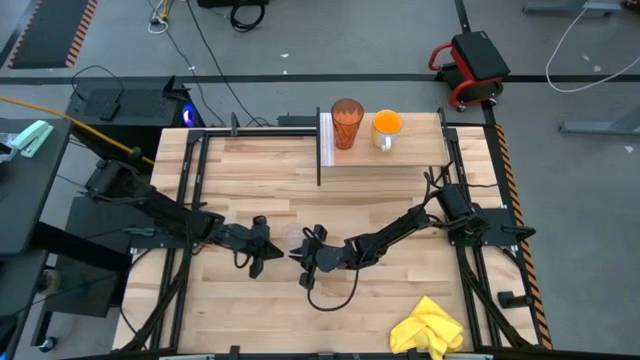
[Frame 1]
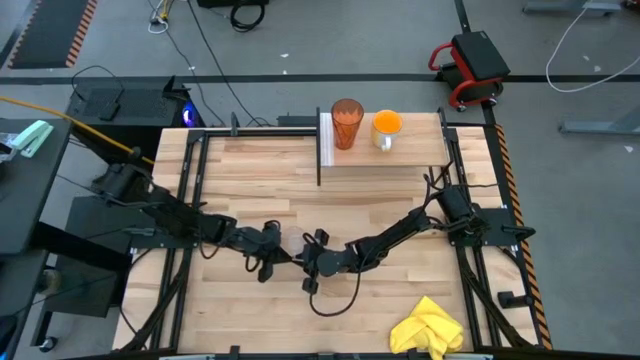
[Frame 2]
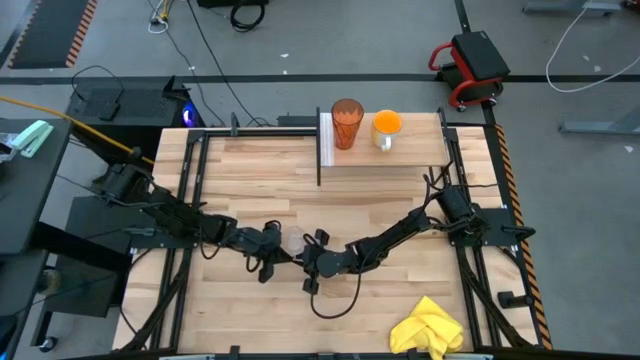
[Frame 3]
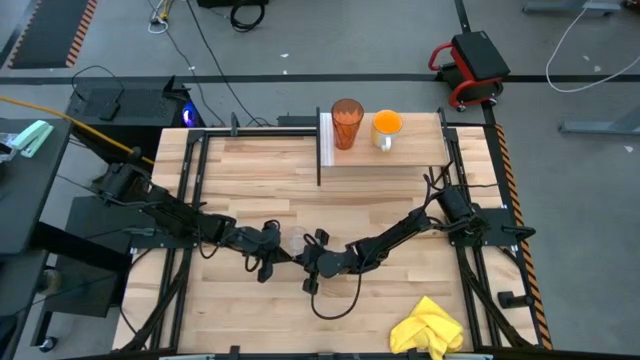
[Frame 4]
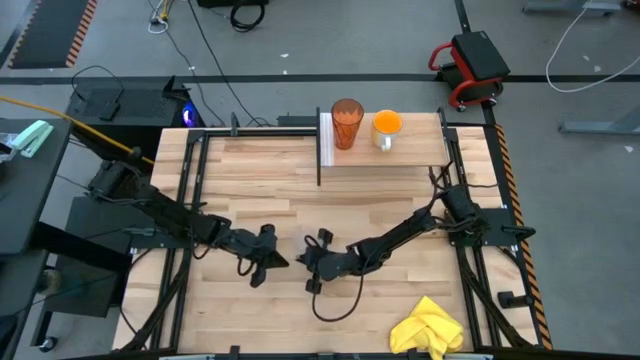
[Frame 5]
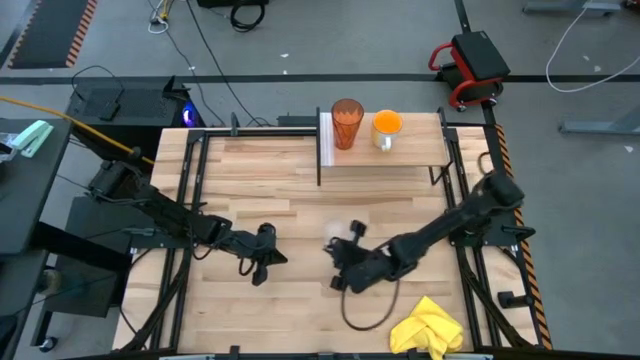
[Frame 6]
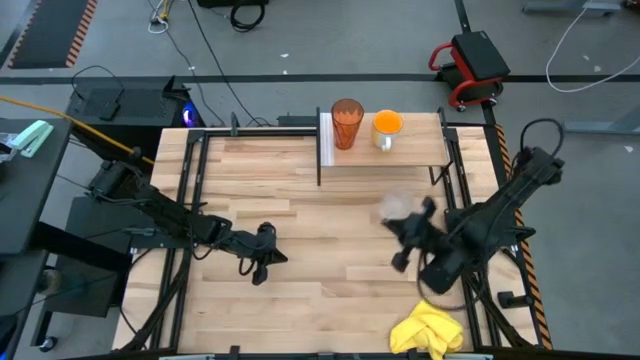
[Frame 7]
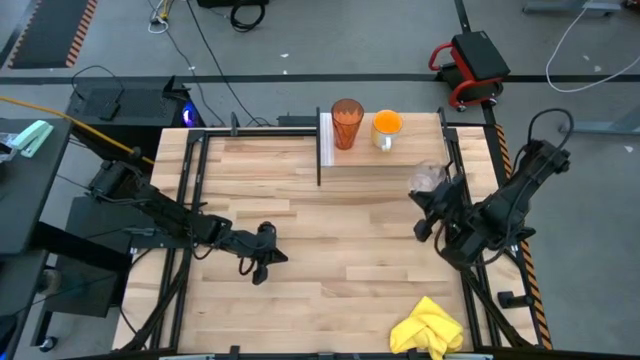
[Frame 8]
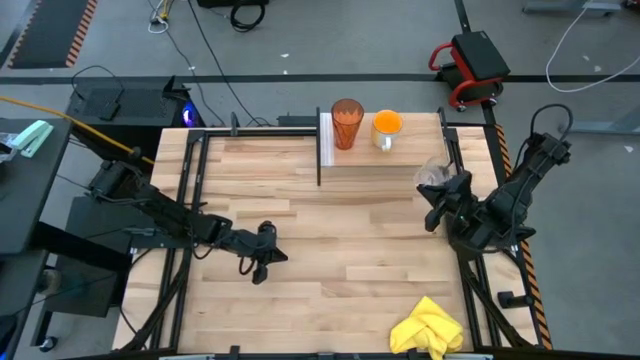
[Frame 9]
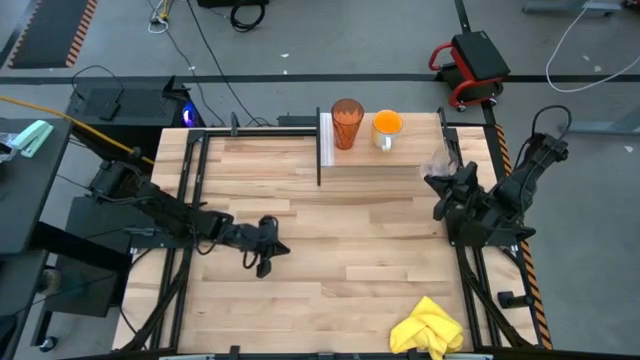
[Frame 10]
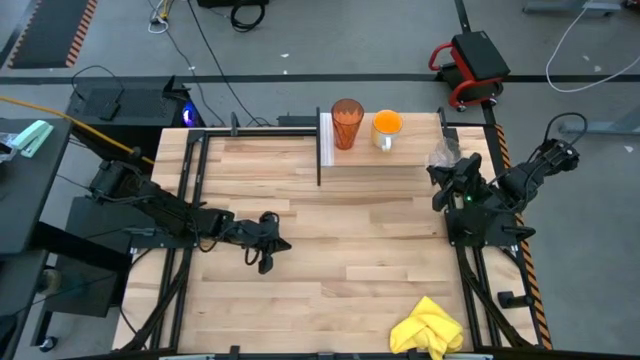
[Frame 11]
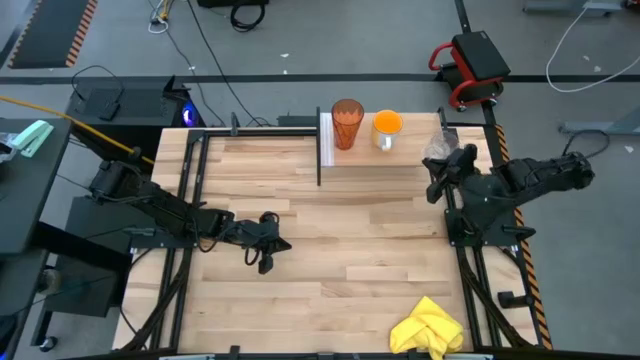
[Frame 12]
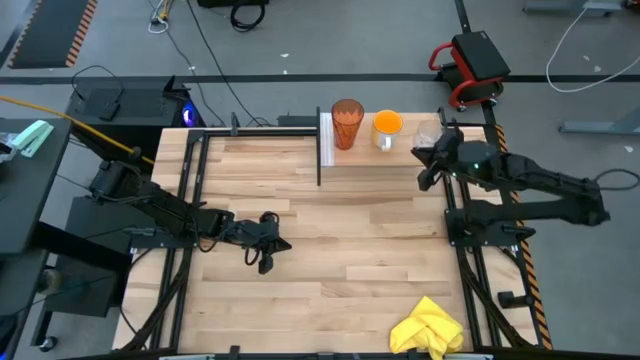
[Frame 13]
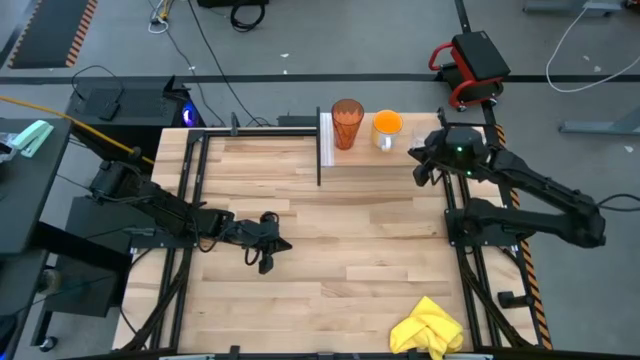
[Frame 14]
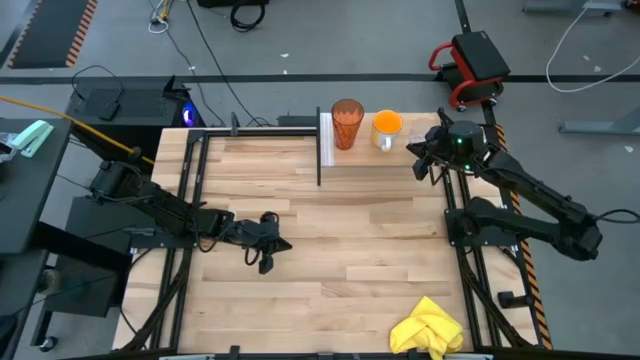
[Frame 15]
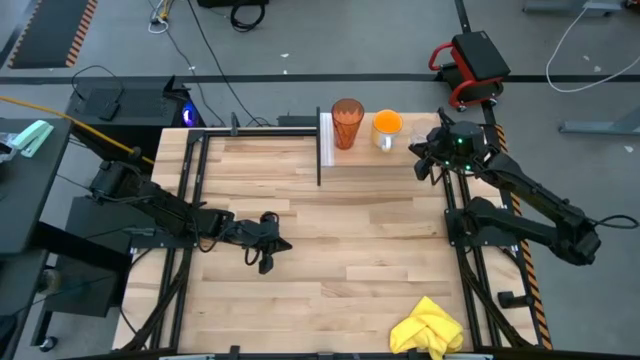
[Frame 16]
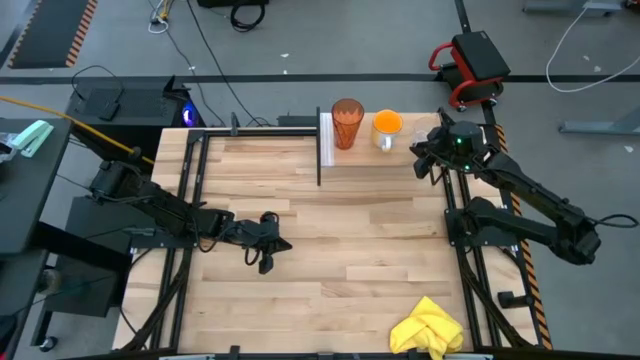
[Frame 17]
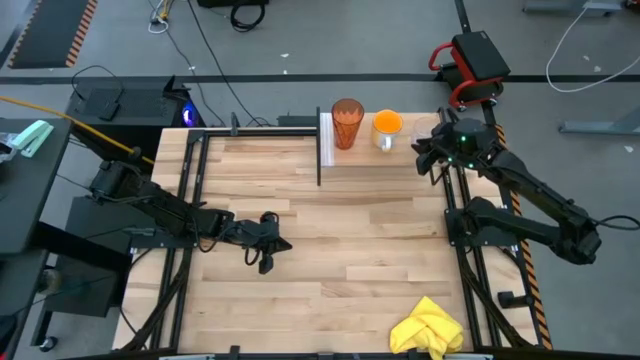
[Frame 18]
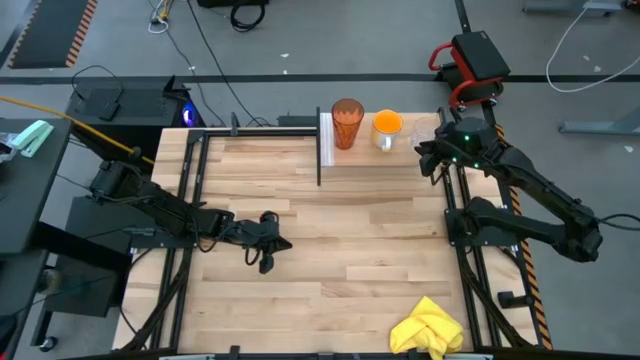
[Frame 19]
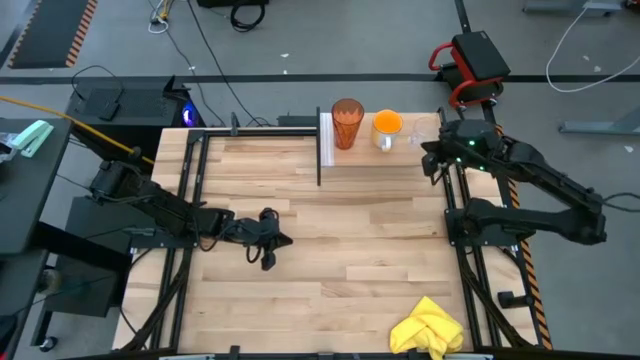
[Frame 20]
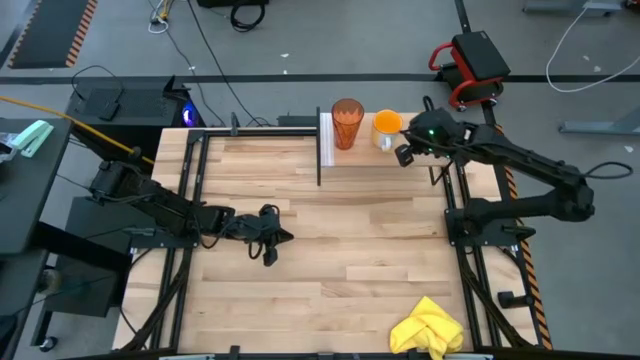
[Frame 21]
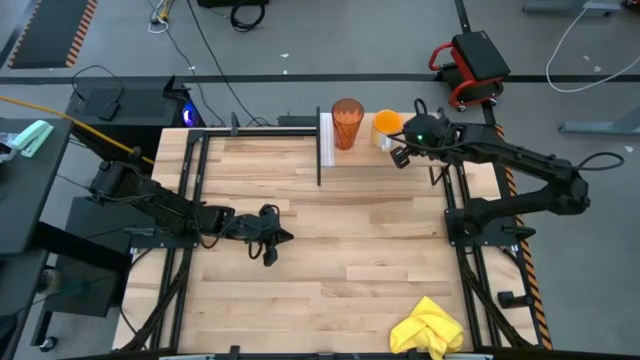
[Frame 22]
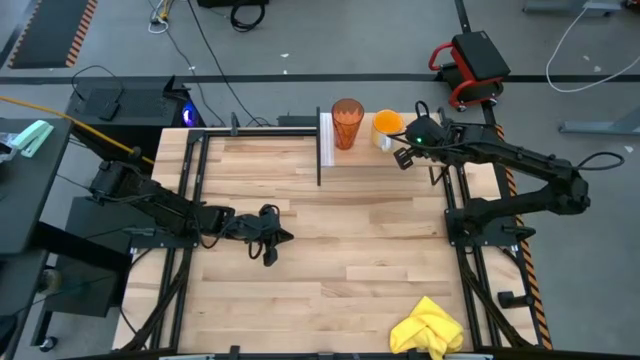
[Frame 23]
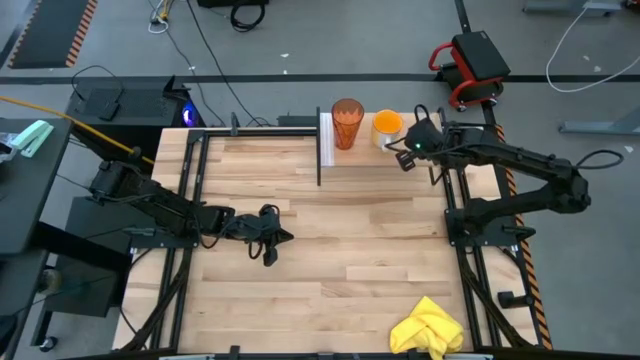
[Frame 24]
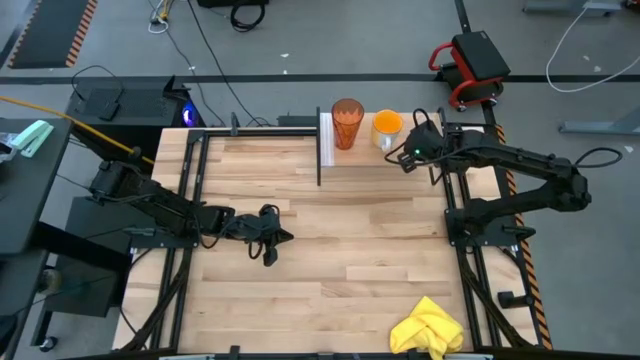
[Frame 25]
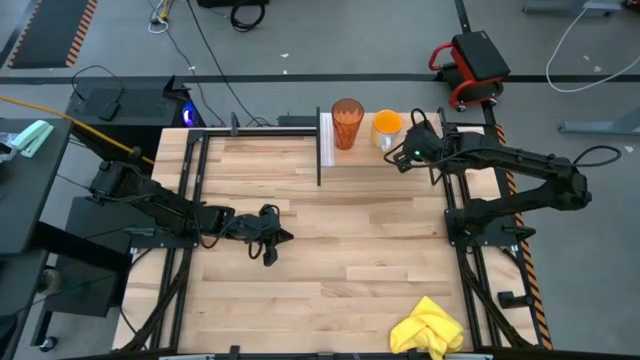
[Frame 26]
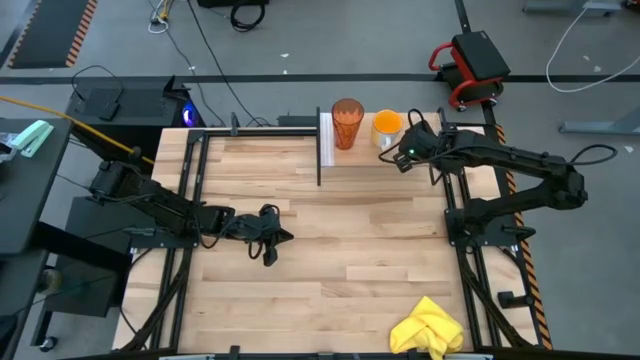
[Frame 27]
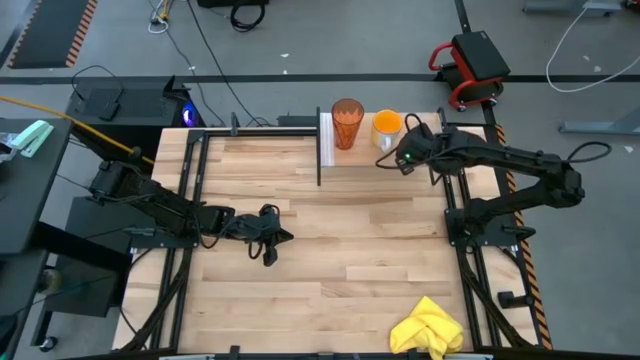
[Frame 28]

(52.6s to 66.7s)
Task: Stack small to large cups/mugs on shelf
Put the transparent mug on the shelf

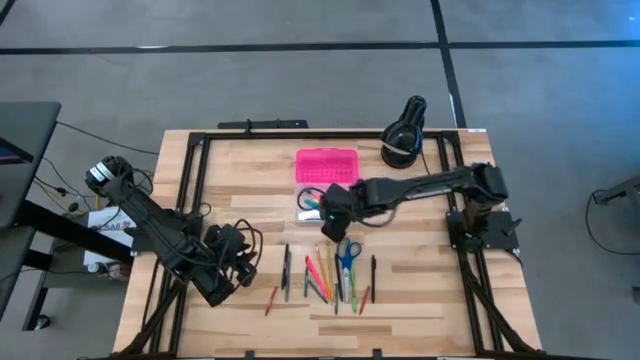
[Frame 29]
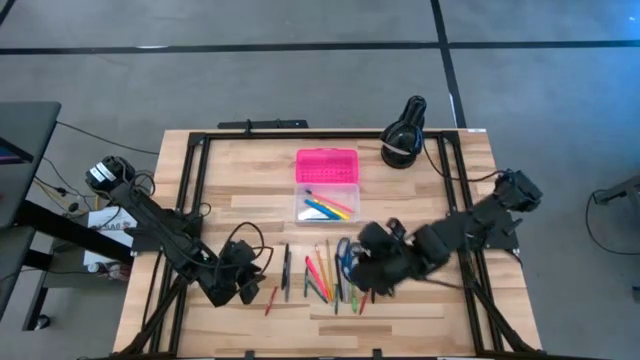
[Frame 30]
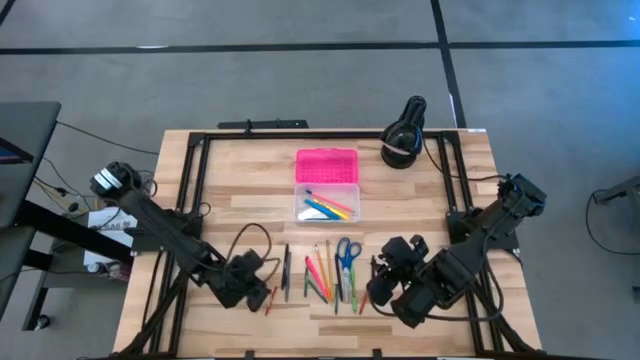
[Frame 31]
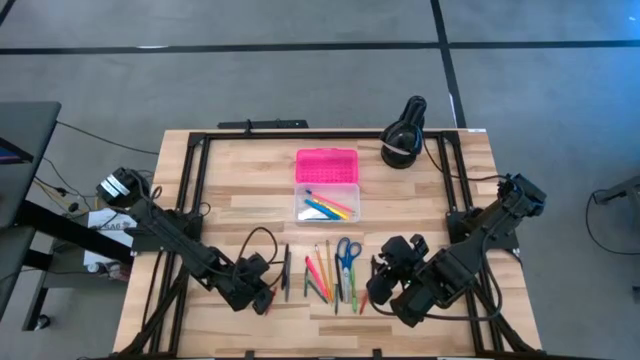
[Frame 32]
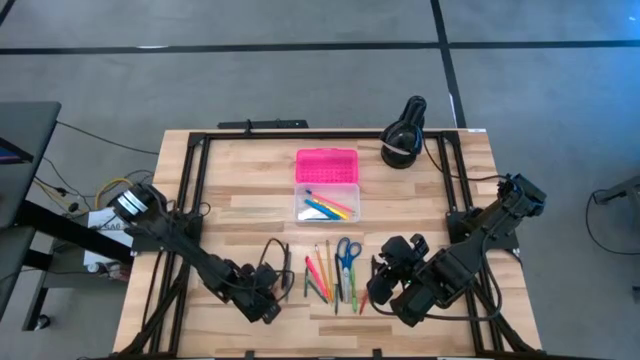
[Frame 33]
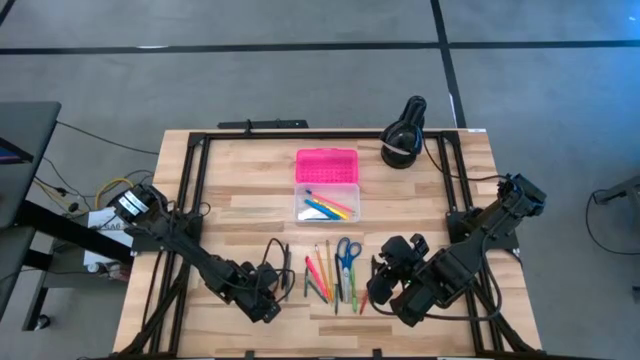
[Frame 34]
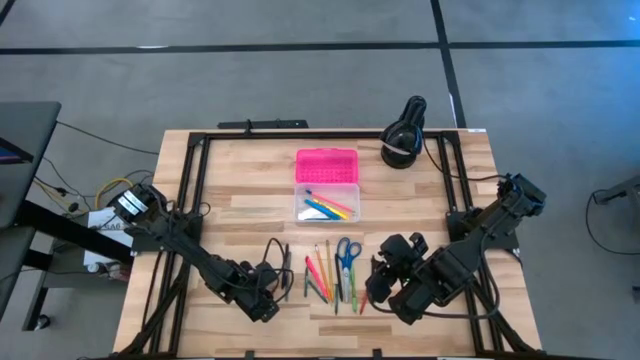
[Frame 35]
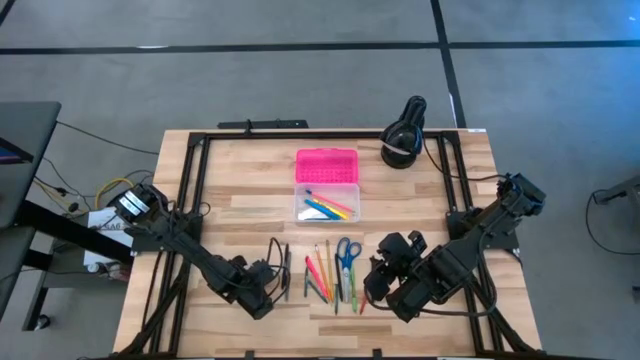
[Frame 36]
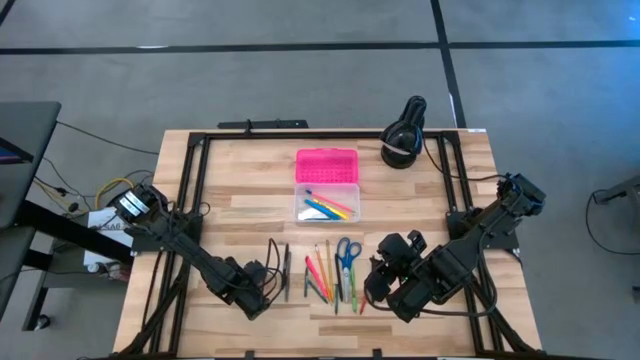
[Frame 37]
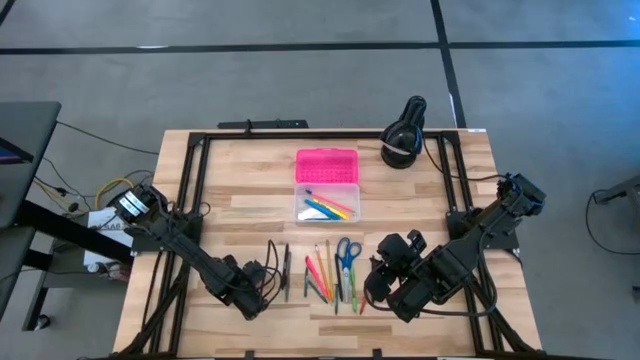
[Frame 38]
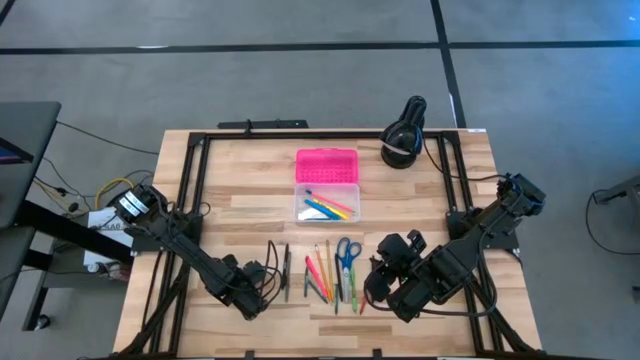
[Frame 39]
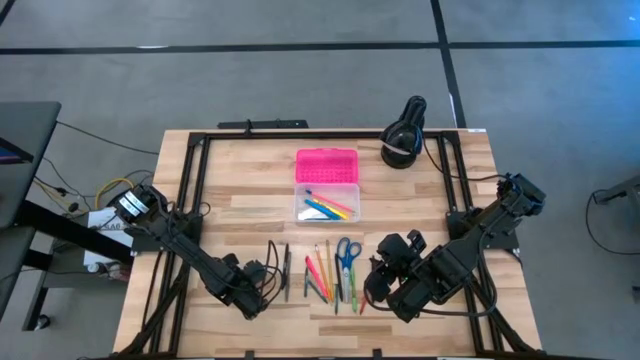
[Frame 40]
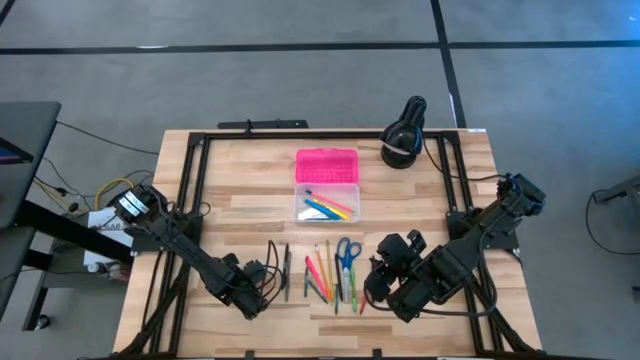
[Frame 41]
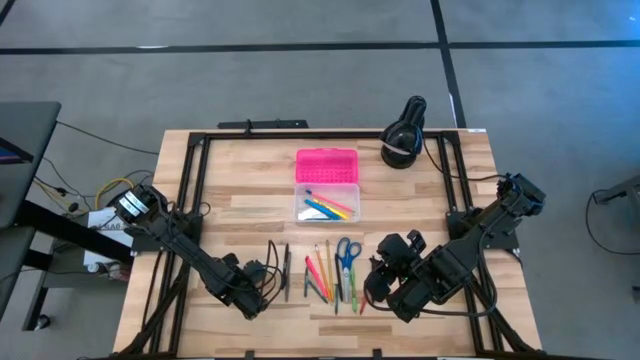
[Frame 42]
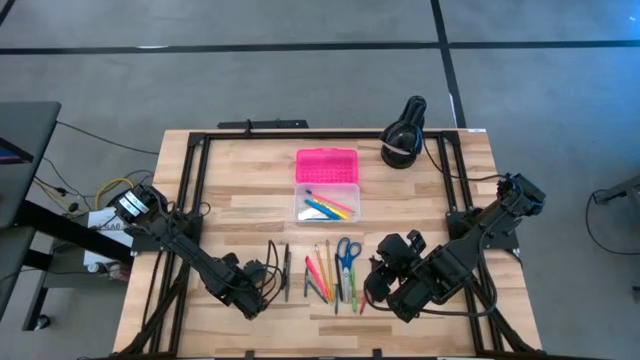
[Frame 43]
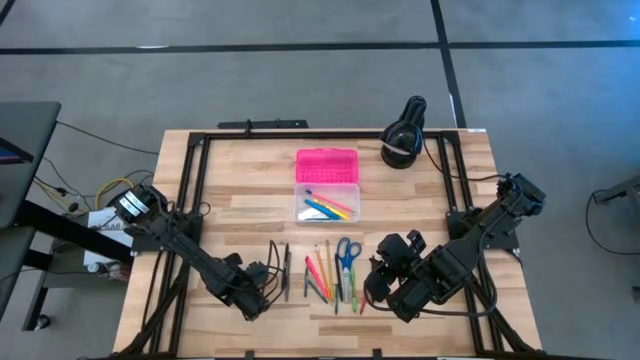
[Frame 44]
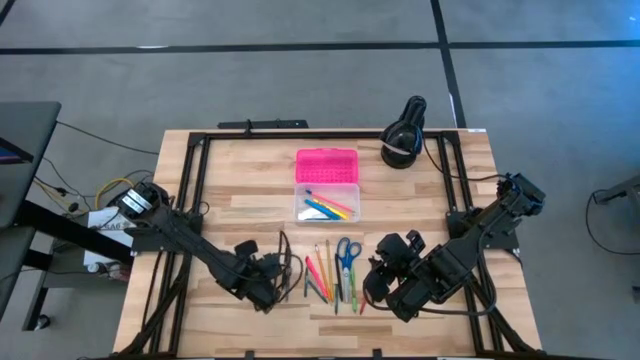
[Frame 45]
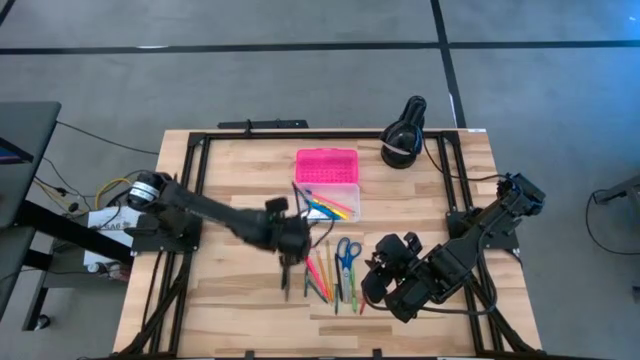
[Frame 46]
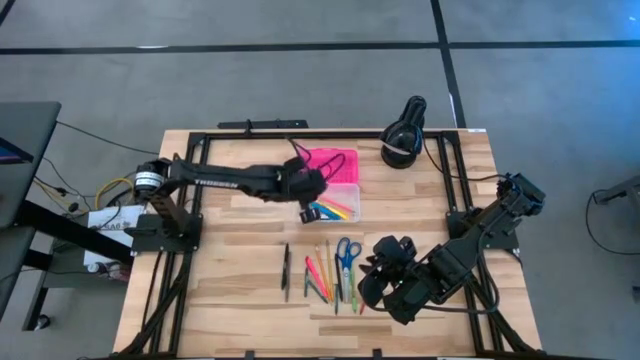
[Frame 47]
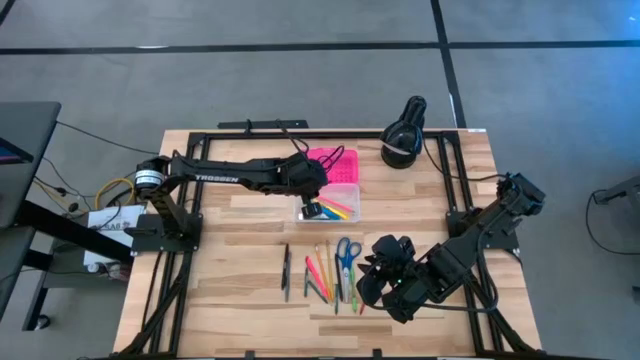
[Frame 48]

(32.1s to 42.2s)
Task: Pick & place school supplies into a supply box
Put the red crayon into the pink supply box
